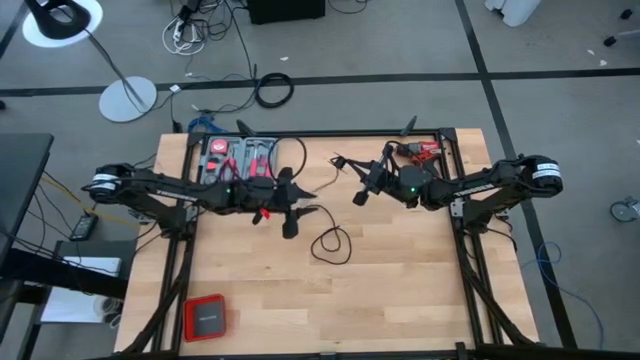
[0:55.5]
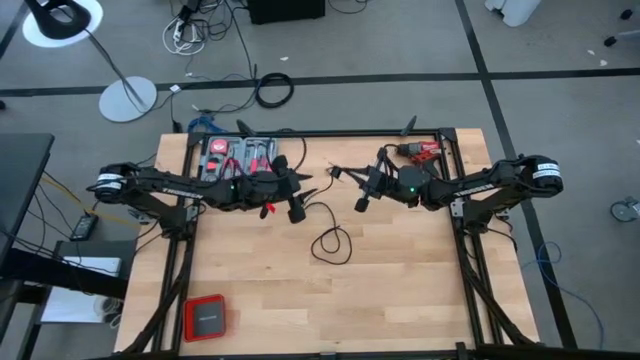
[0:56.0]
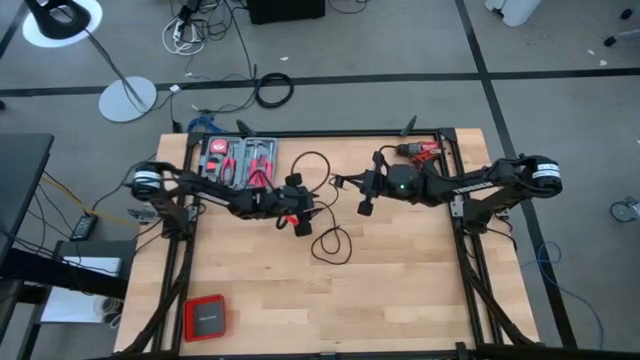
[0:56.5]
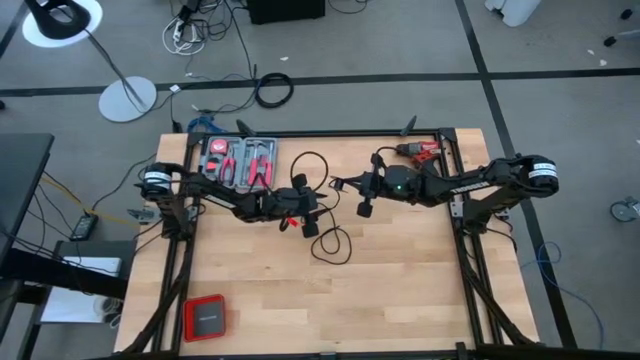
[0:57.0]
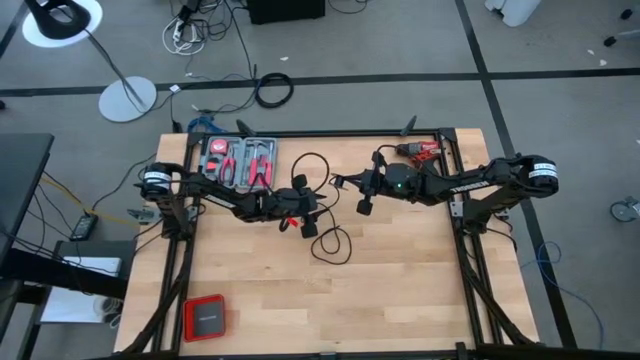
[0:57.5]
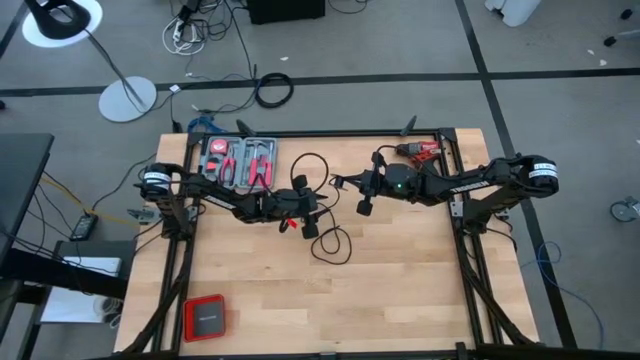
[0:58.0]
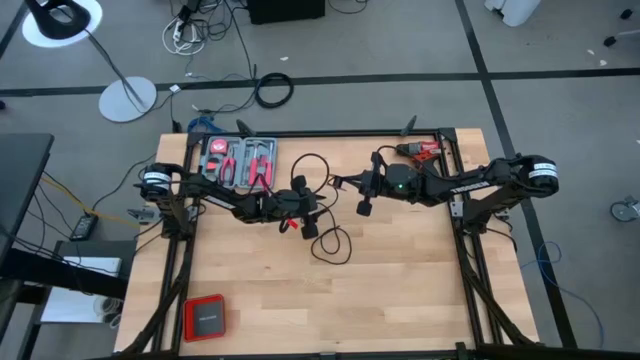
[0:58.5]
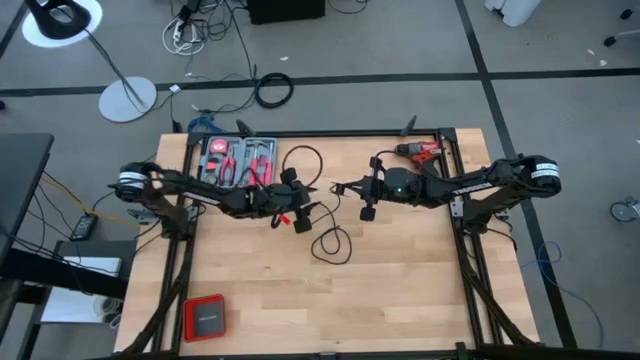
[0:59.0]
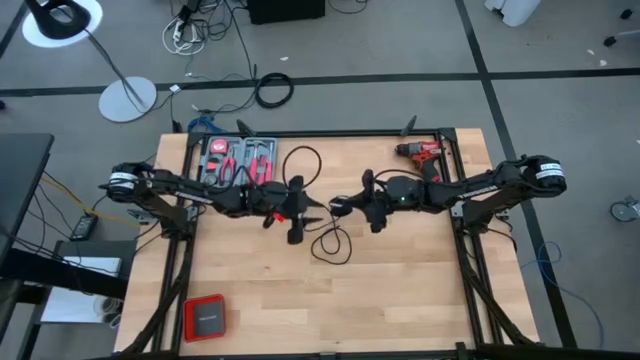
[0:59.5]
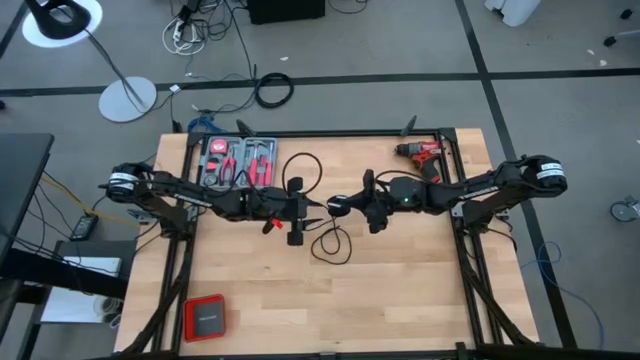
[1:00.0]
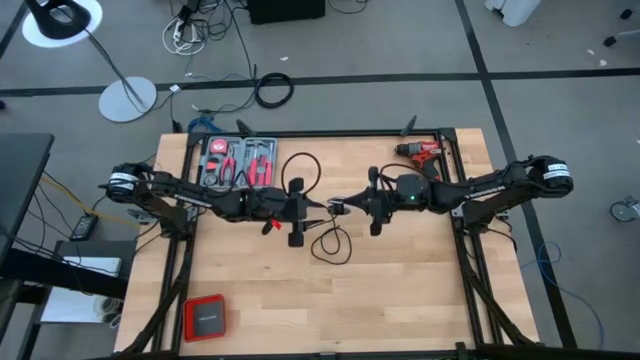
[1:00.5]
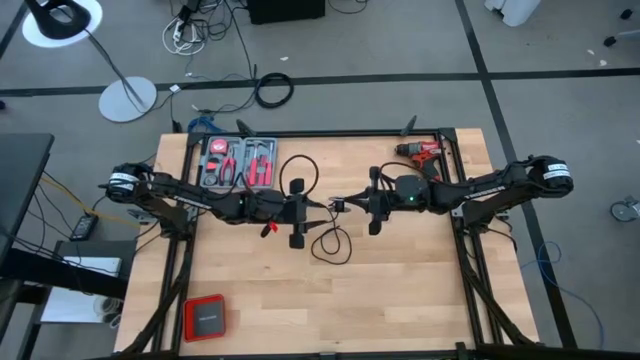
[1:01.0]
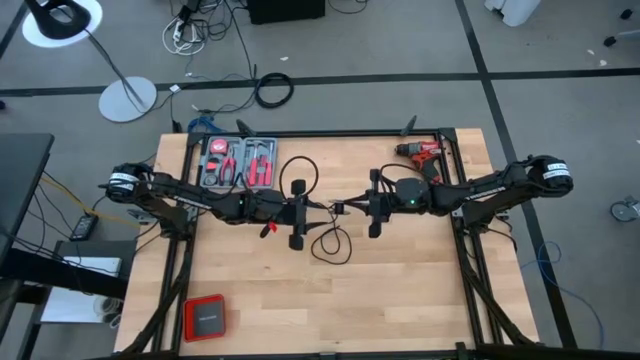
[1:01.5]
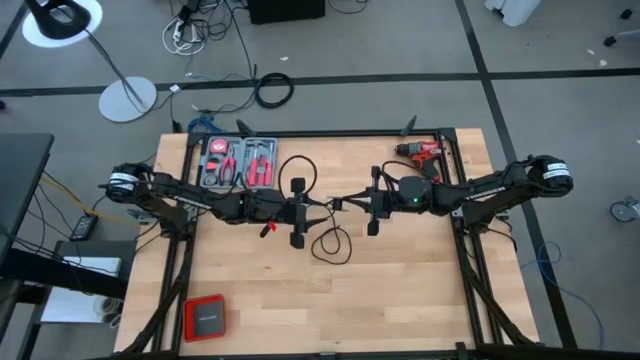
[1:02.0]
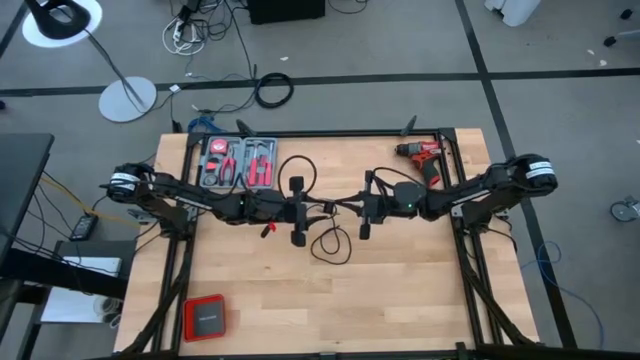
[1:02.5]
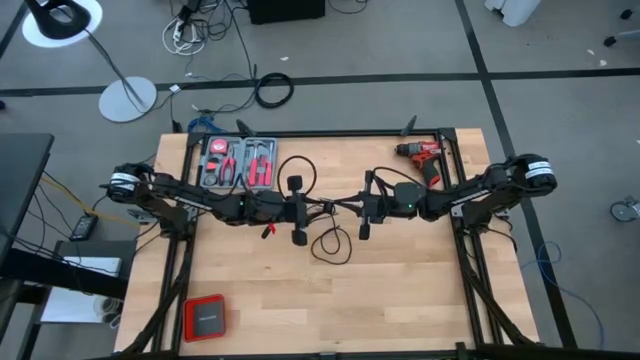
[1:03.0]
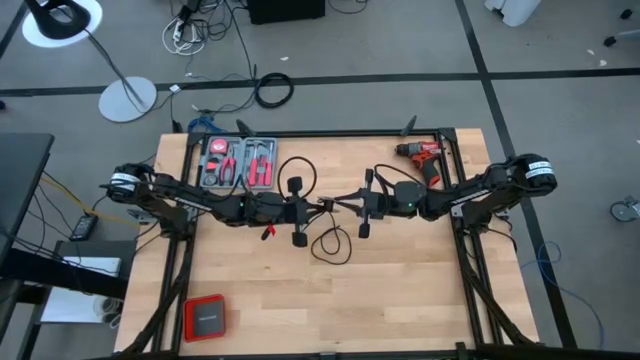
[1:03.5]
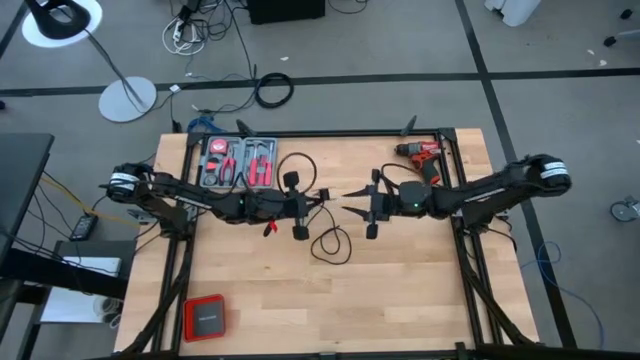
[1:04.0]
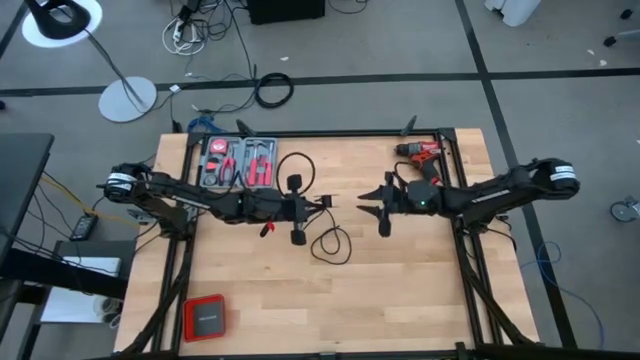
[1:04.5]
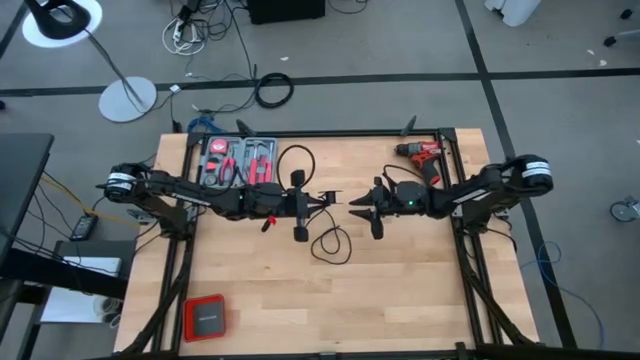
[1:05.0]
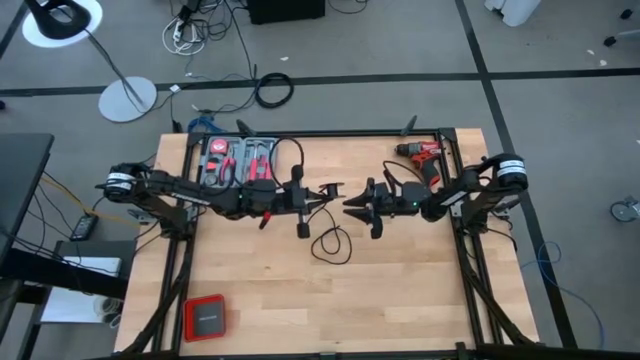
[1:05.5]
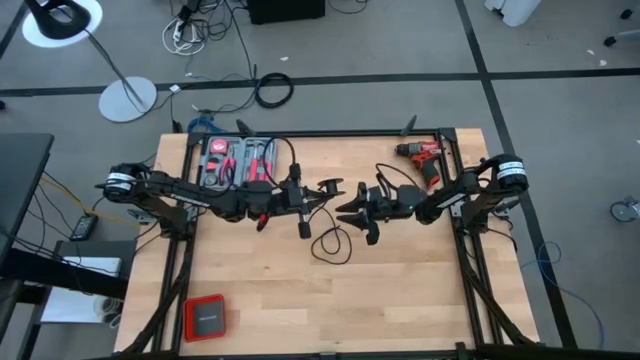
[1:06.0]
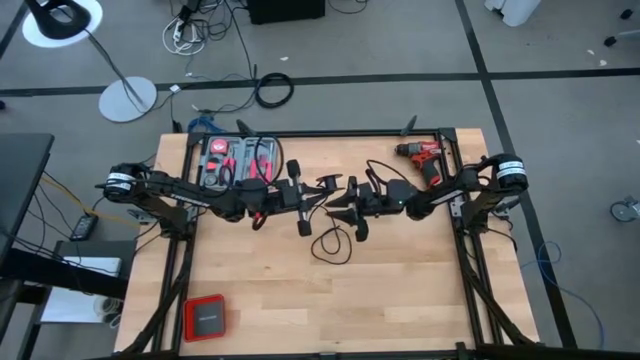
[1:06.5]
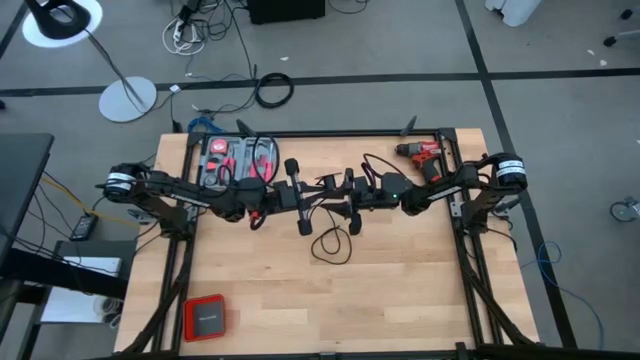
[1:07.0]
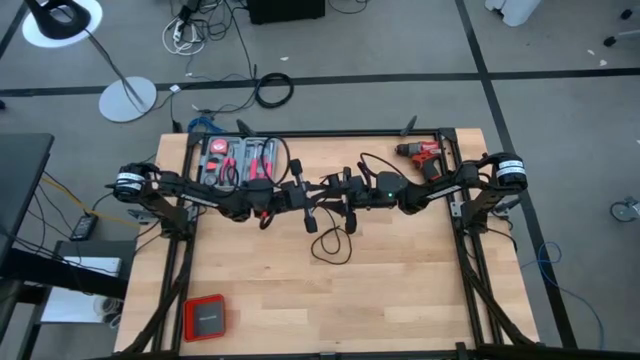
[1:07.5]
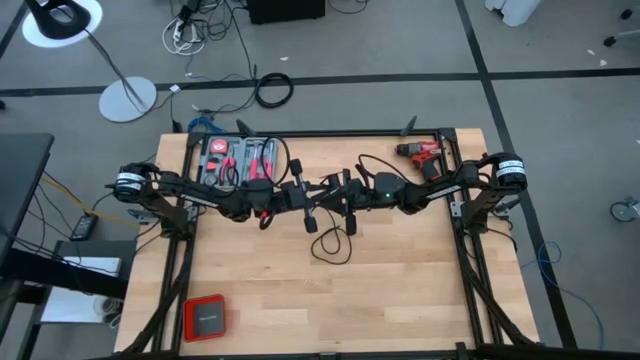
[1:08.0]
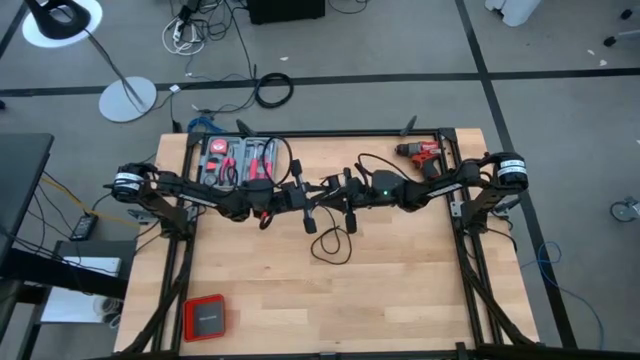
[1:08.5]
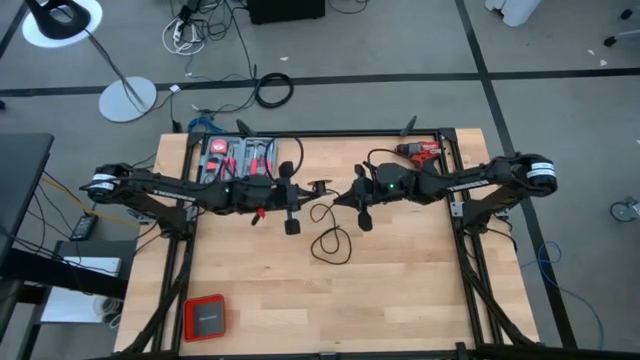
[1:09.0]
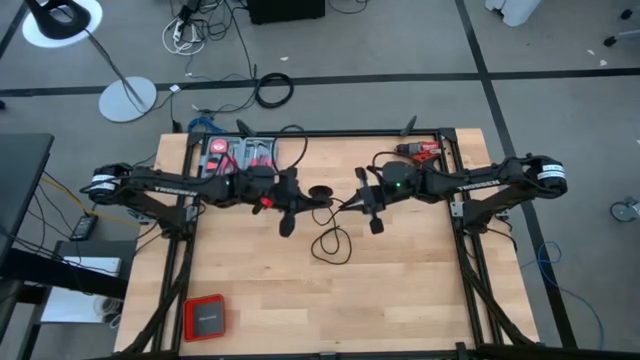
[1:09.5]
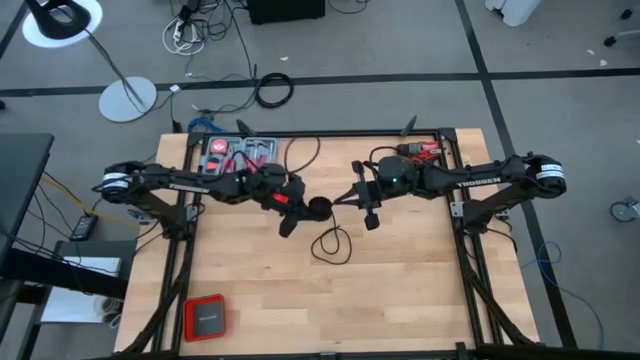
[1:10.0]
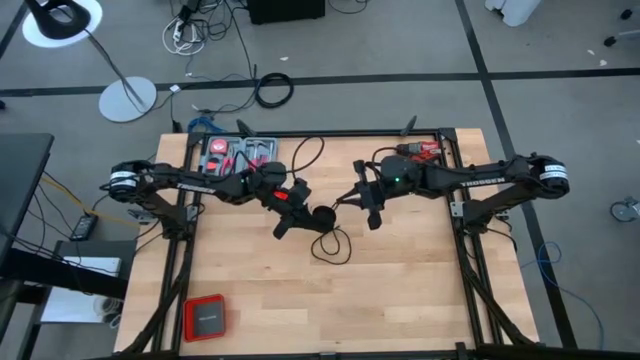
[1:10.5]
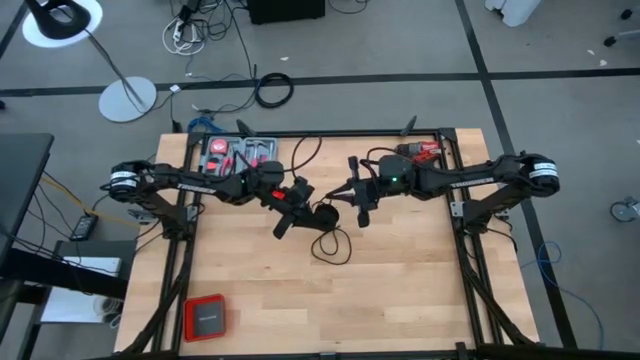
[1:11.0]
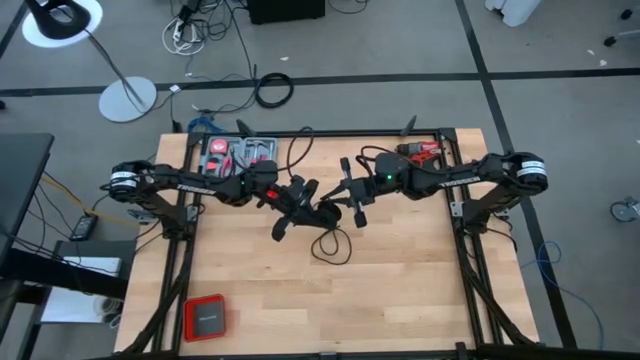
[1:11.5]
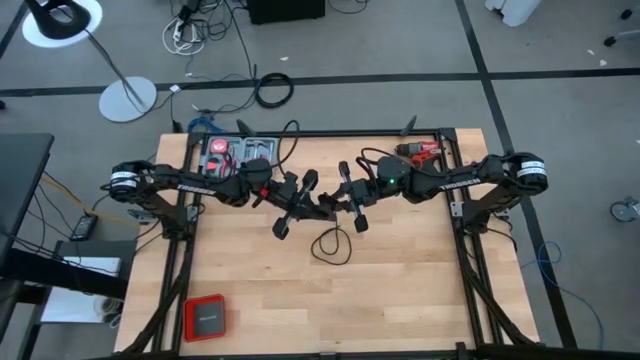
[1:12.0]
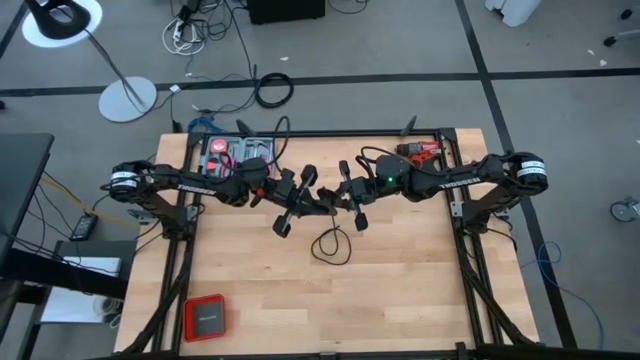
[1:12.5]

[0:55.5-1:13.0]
Task: Coil cords
Coil the black wire on the spool

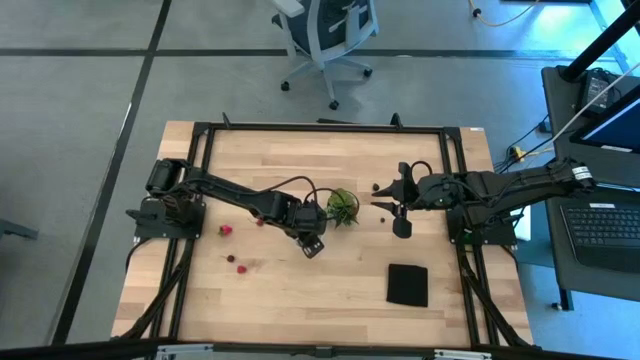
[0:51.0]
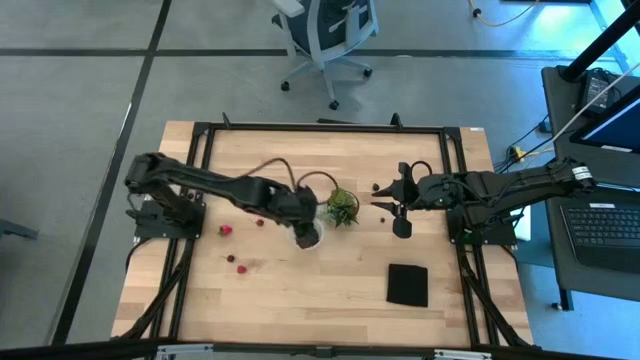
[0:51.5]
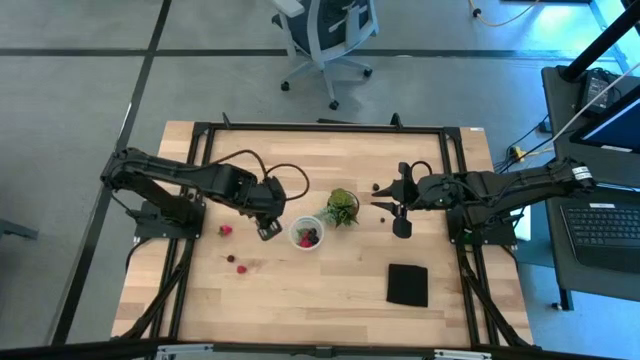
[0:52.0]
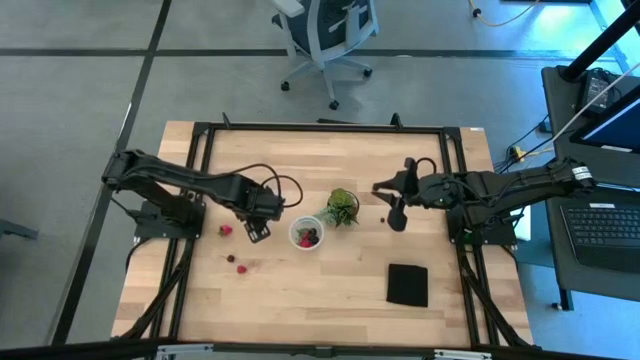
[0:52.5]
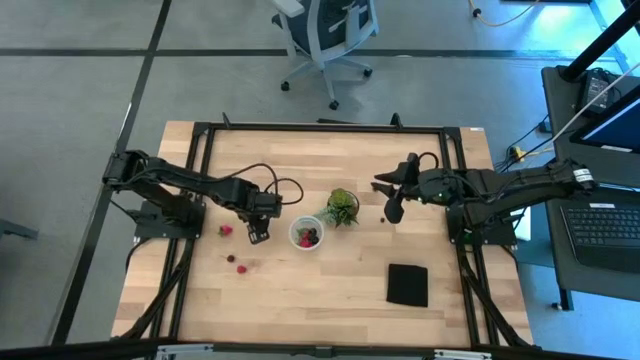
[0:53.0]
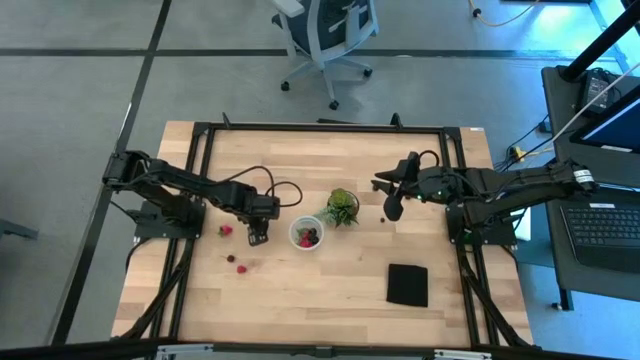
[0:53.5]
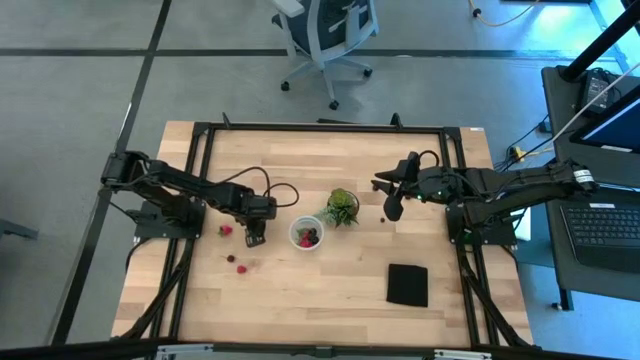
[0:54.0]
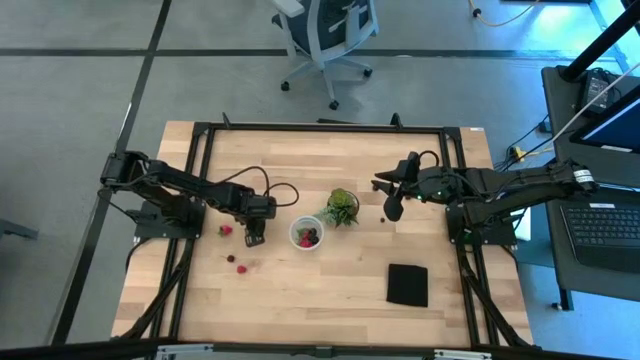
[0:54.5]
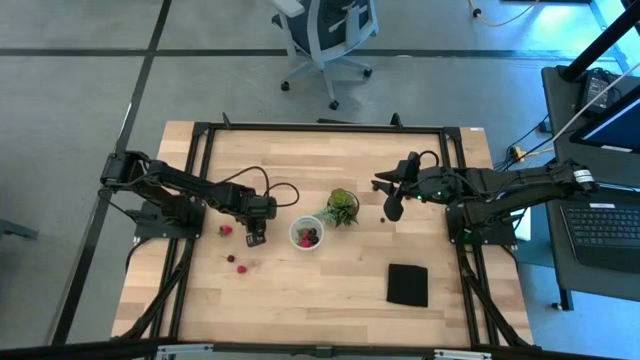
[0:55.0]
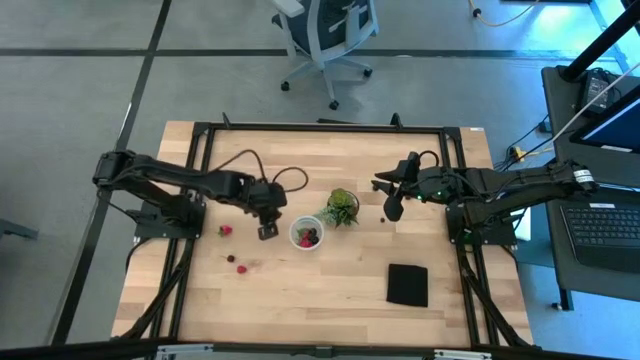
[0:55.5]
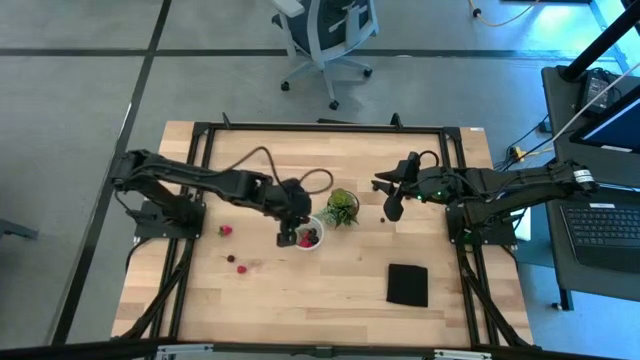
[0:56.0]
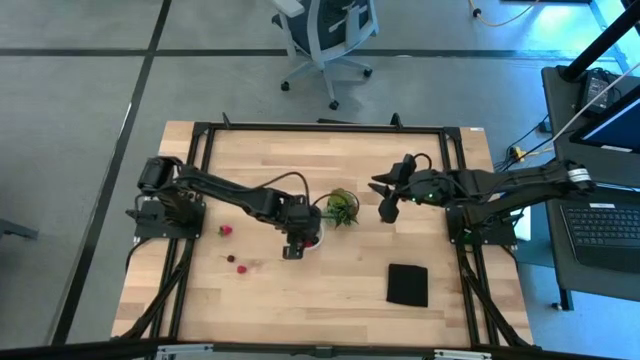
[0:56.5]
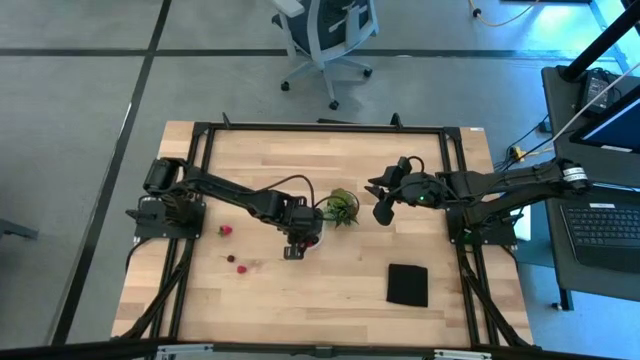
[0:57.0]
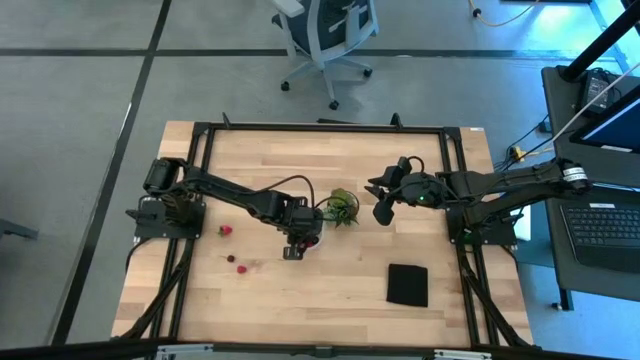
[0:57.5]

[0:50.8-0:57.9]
Task: Pick and placing Produce into tupperware
Put the top red cherry into the transparent container
